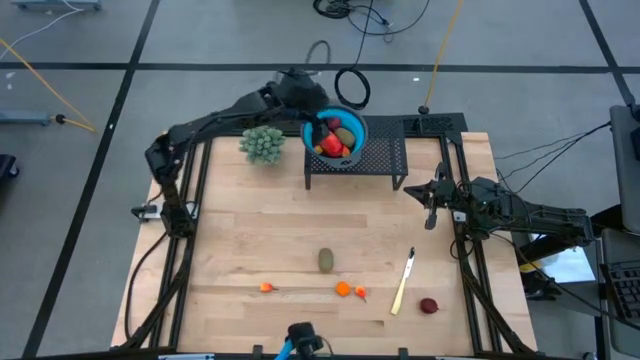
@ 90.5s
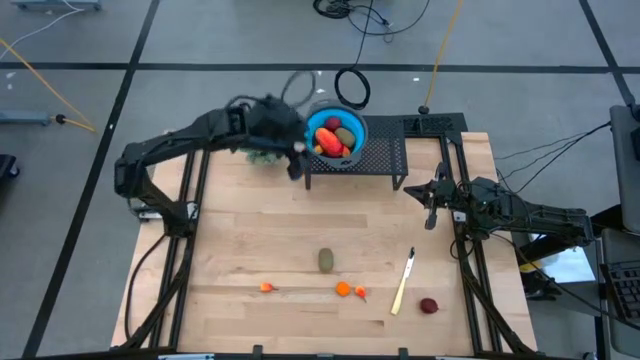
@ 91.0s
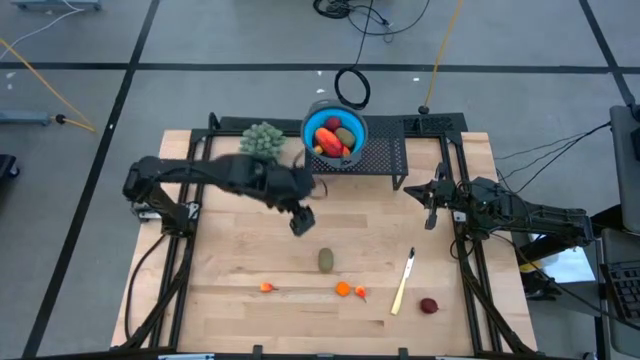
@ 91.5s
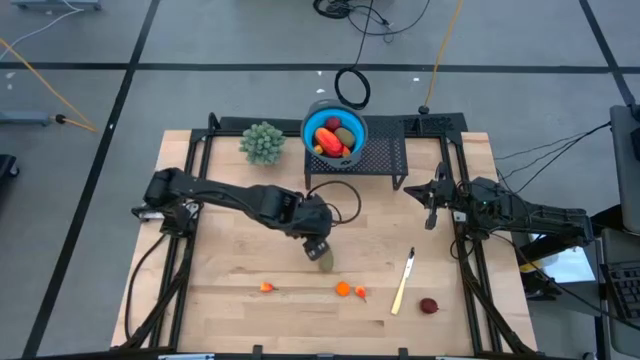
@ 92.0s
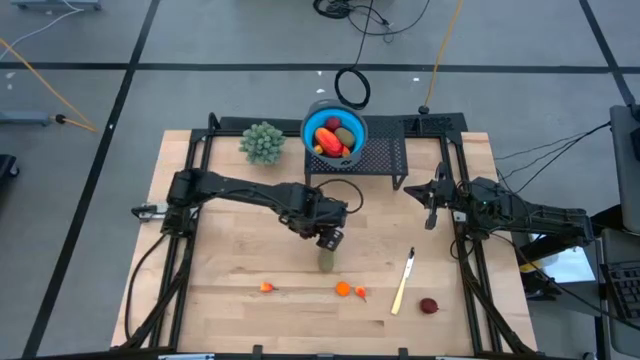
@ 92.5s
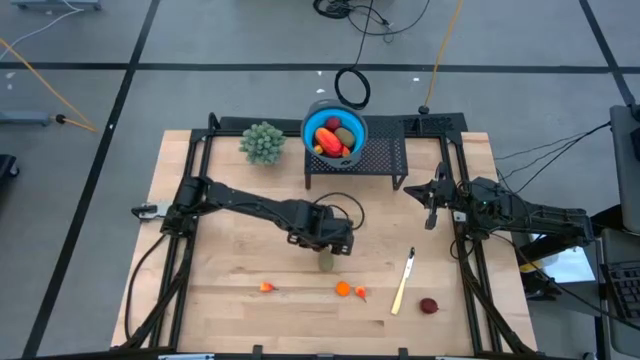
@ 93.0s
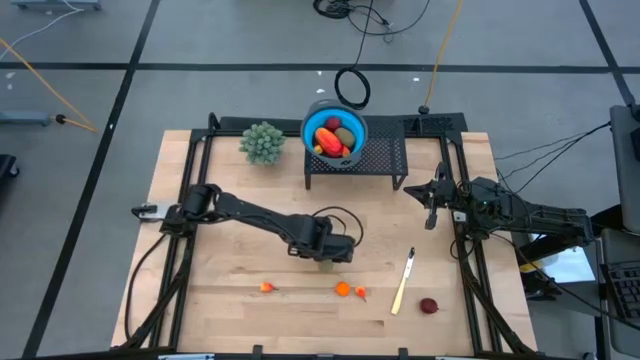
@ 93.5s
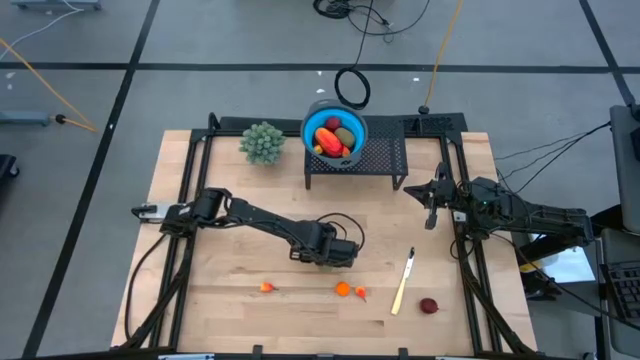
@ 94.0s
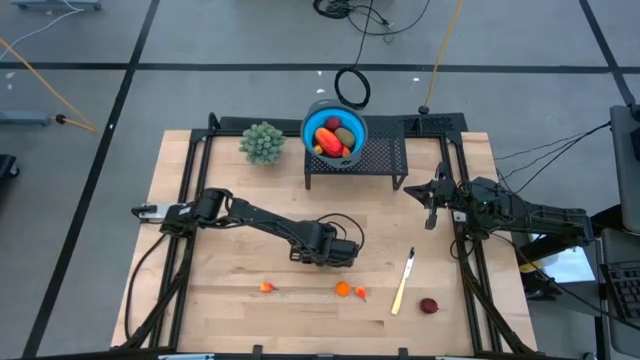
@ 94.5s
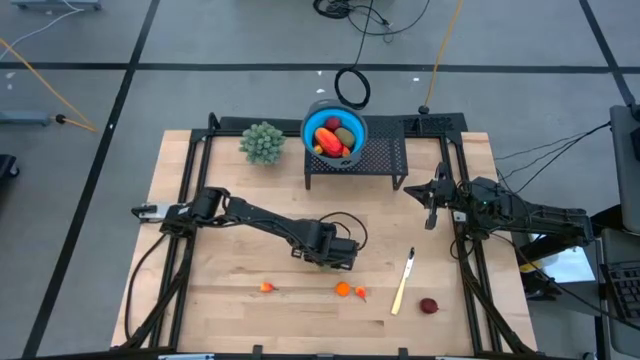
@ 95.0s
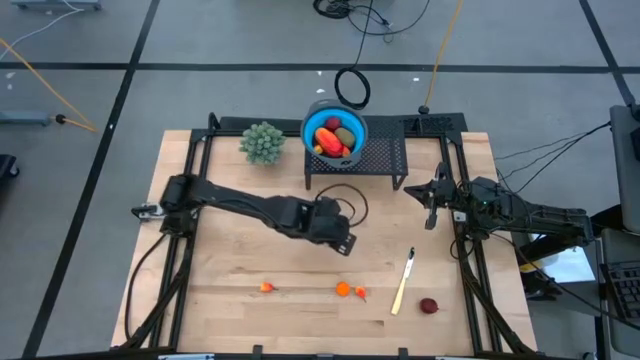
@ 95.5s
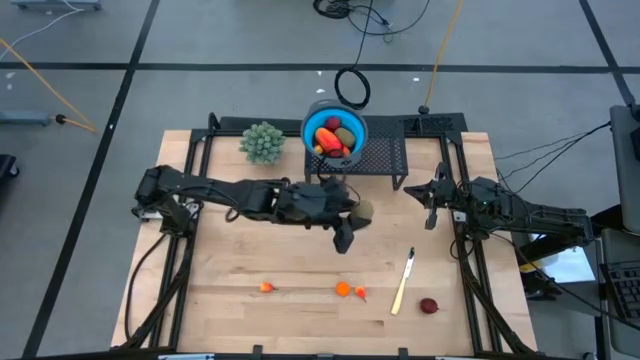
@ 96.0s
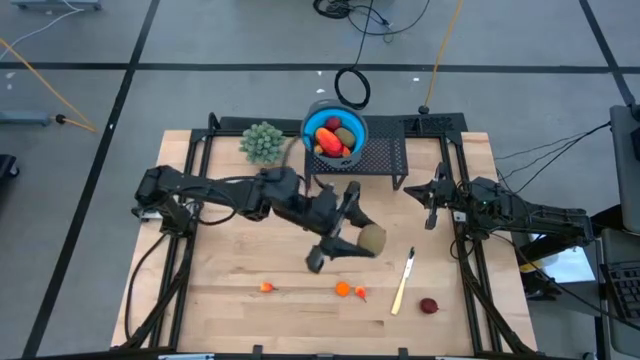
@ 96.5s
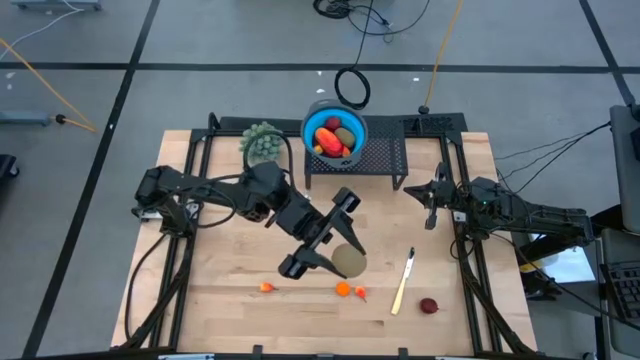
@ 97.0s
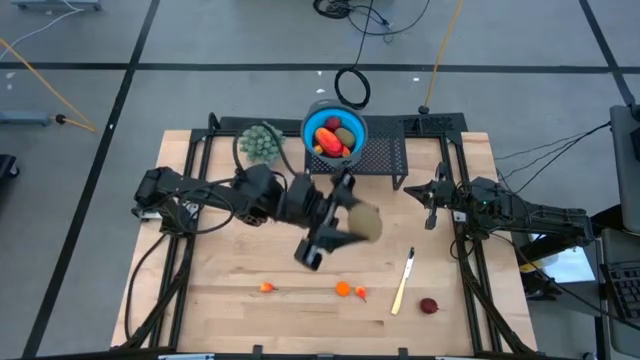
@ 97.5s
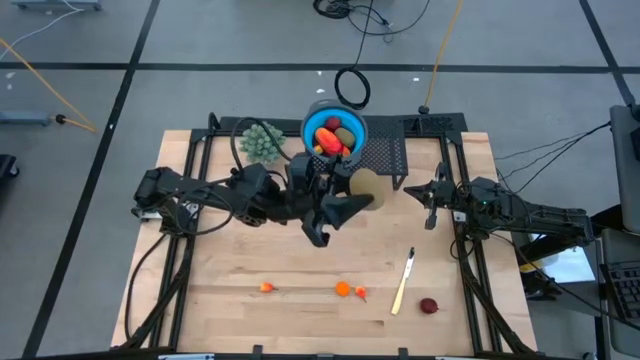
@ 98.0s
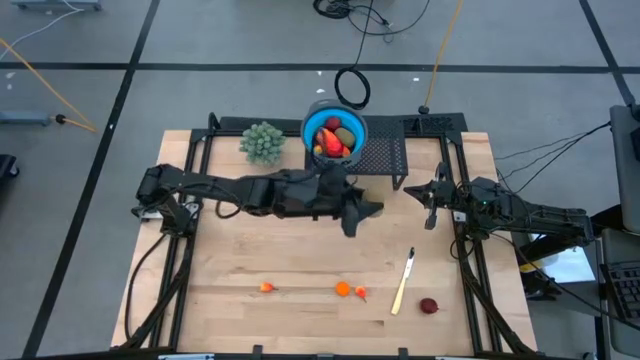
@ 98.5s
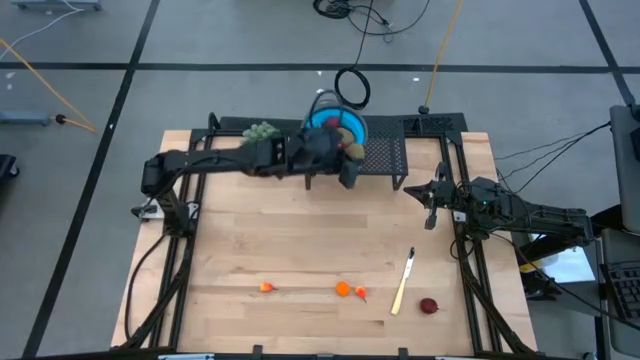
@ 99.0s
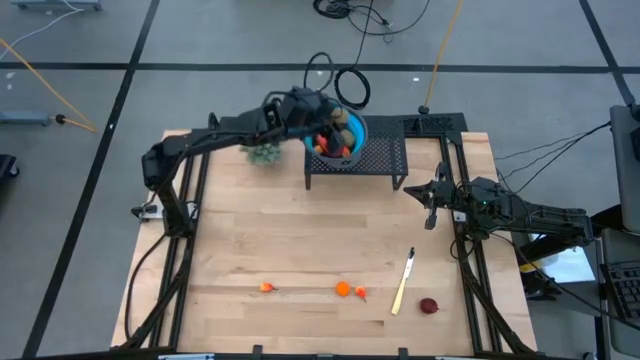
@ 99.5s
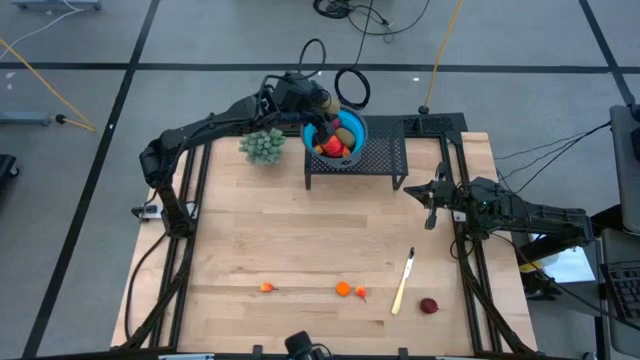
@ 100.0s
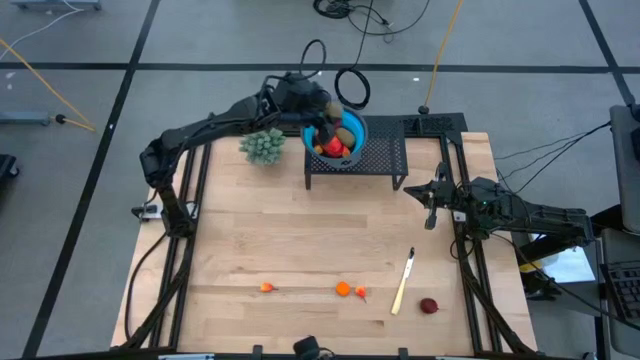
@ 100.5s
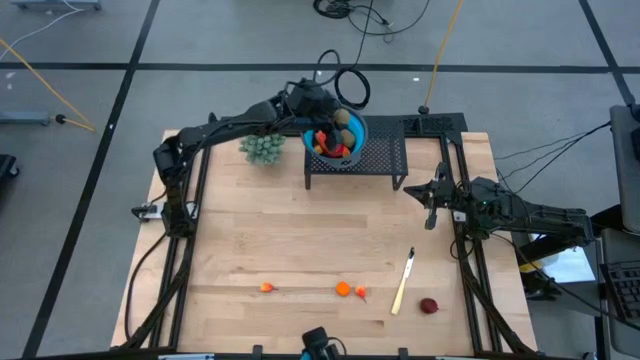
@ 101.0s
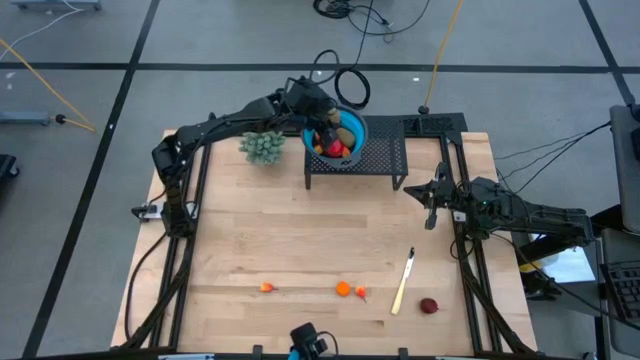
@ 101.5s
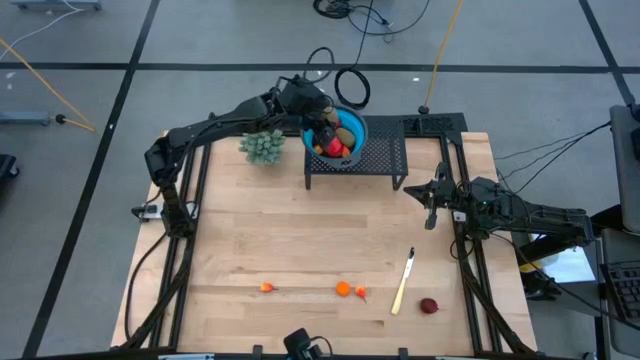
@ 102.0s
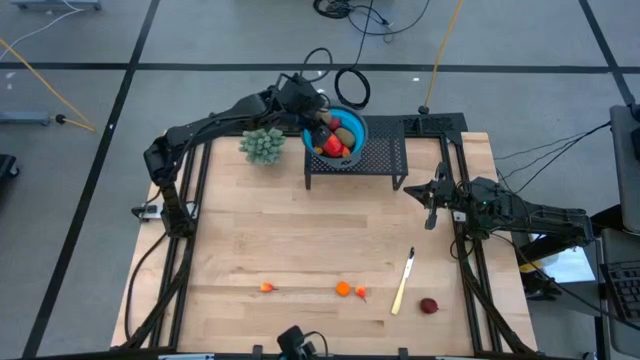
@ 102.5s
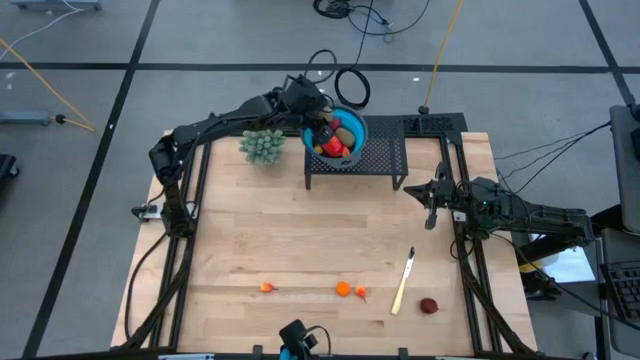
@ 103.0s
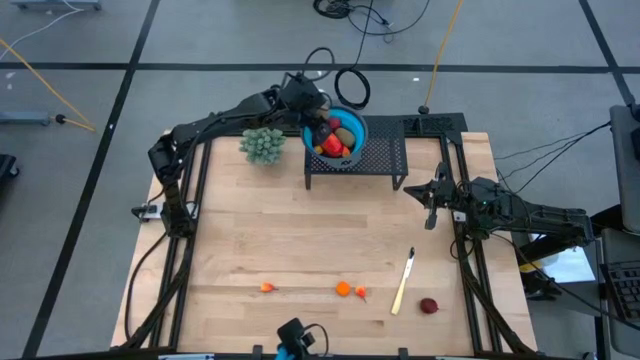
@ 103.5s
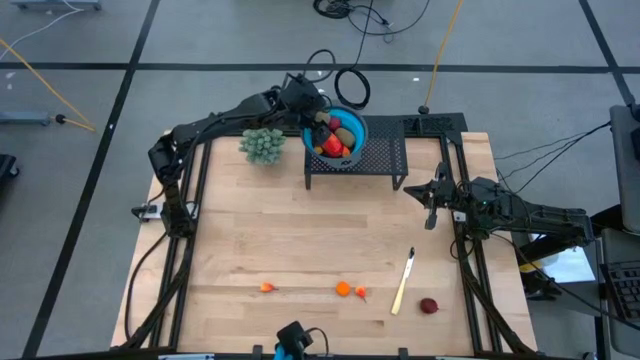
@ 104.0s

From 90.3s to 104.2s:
Task: Pick & Place Fruit
Put the kiwi into the blue strainer on the shelf

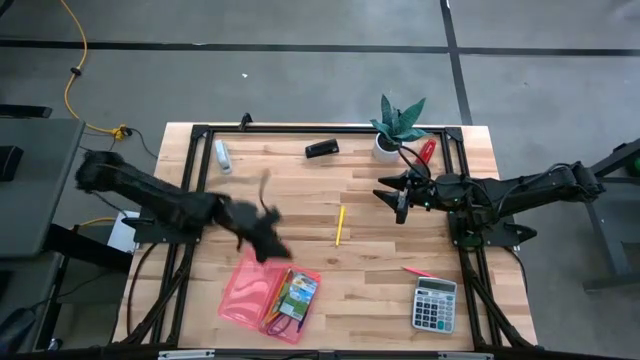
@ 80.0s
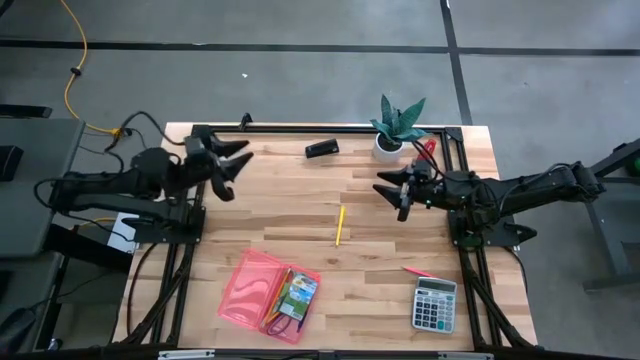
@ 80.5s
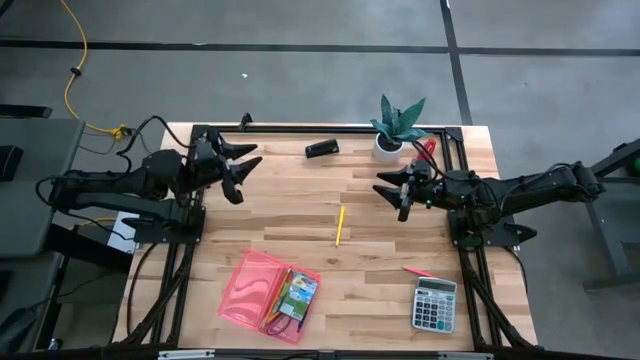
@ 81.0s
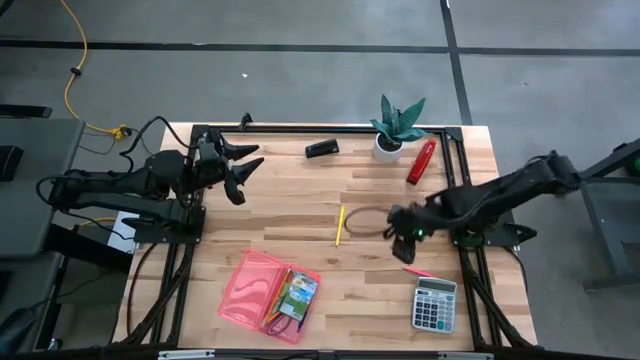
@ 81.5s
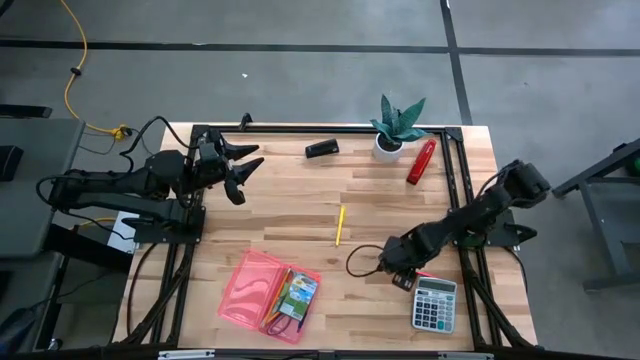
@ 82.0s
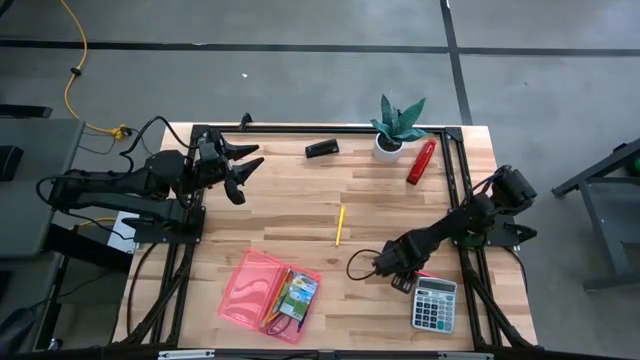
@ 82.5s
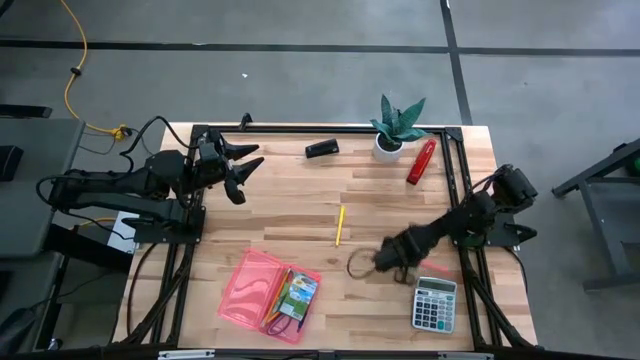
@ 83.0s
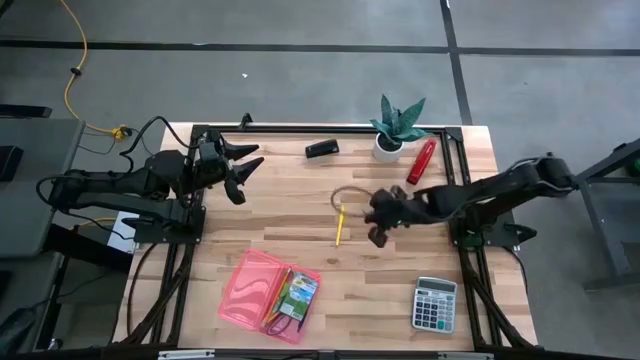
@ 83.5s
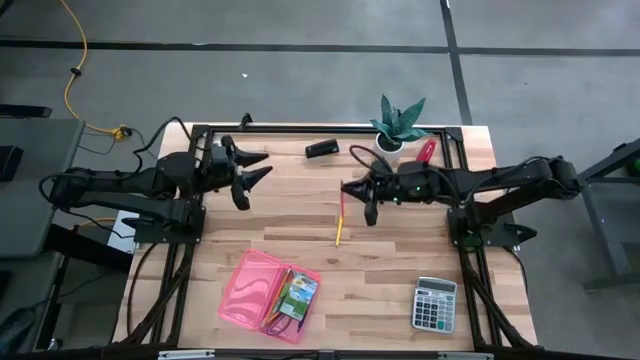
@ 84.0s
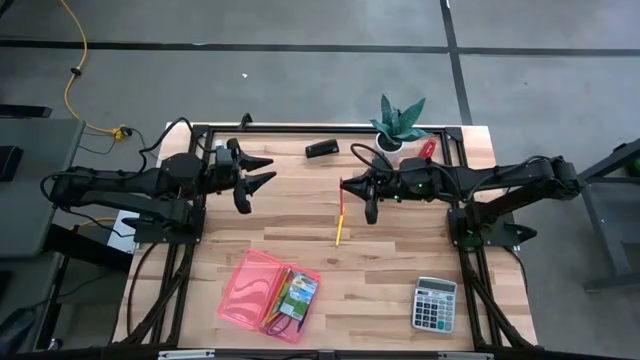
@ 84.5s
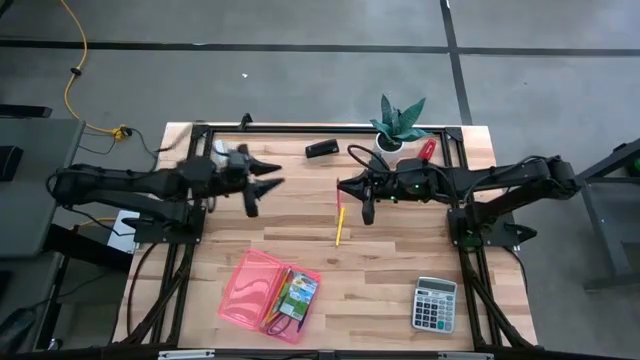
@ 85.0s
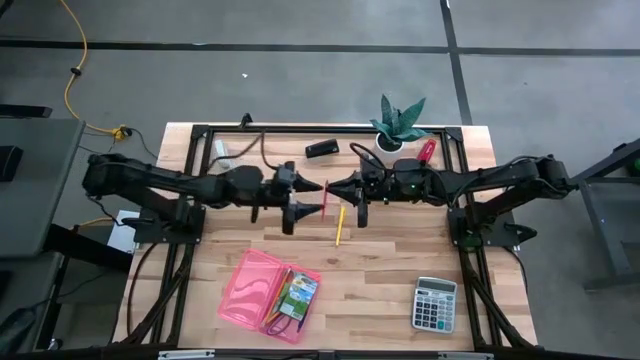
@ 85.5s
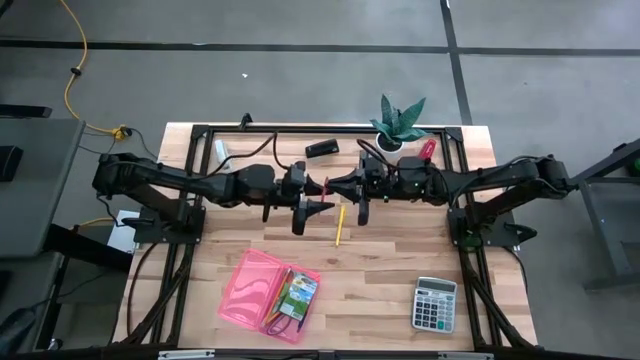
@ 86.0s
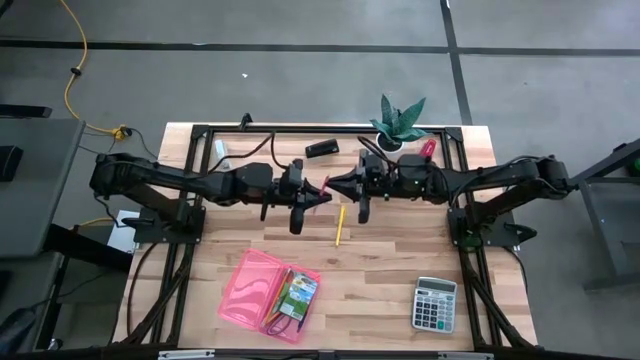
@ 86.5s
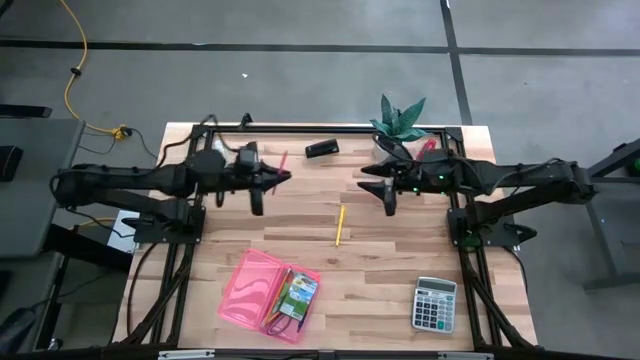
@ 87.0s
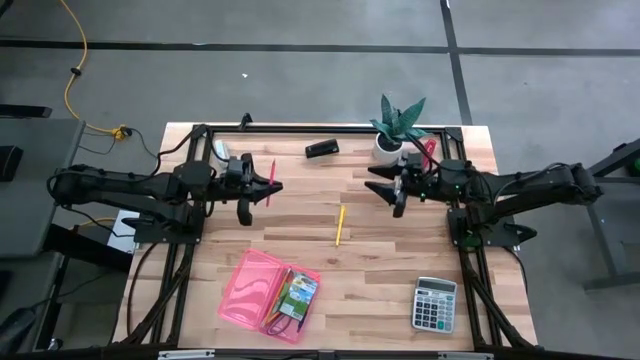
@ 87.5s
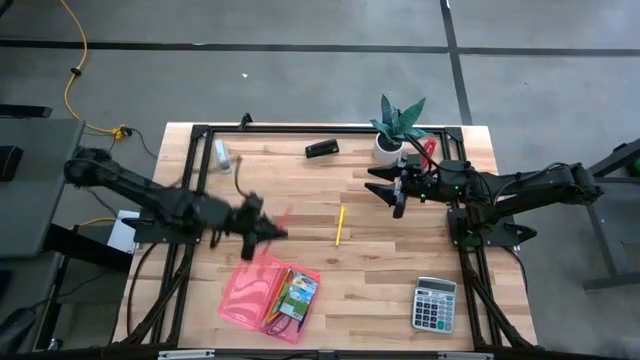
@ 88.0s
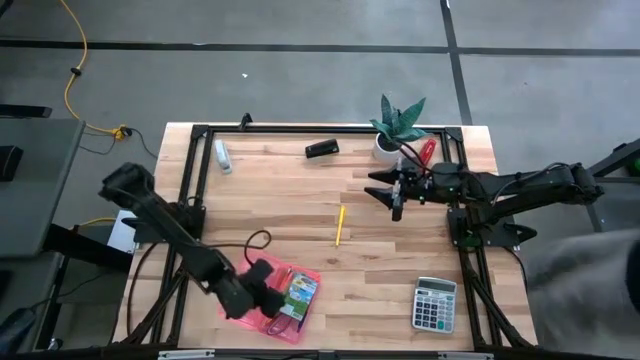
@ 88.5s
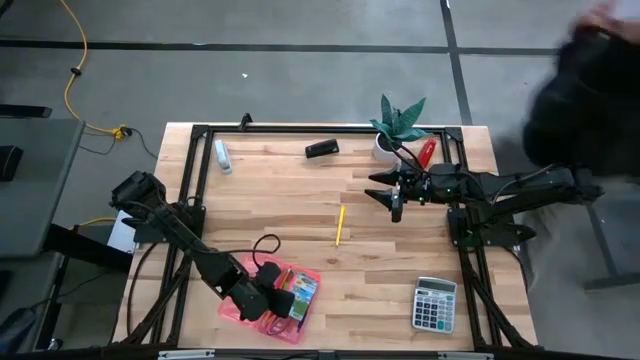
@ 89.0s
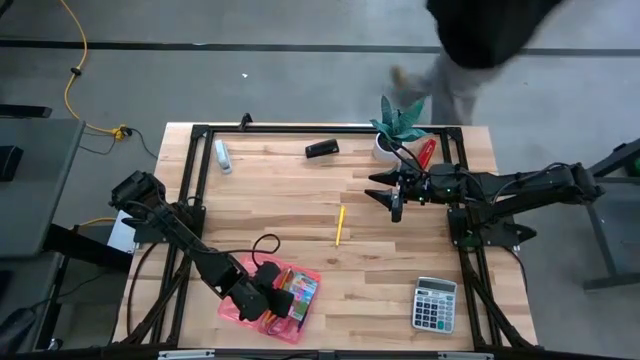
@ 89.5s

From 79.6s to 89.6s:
Task: Pack school essentials
Put the pink pencil into the supply box
